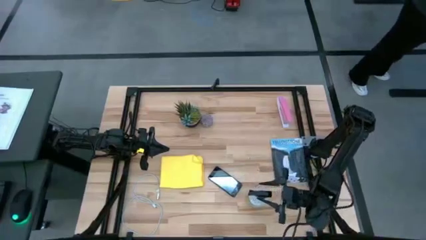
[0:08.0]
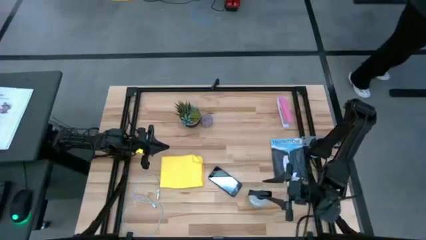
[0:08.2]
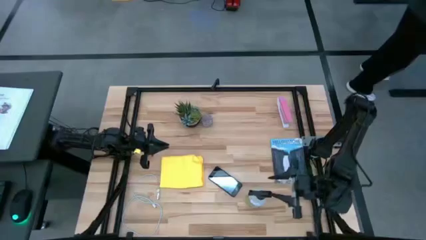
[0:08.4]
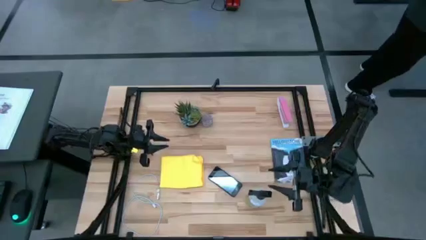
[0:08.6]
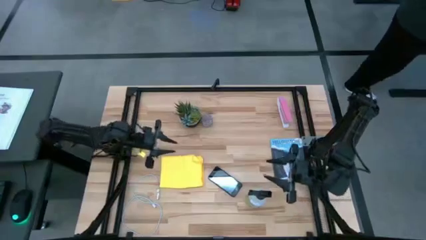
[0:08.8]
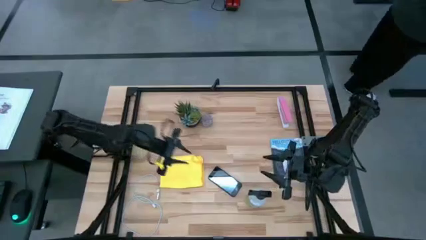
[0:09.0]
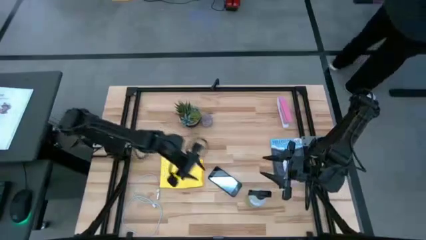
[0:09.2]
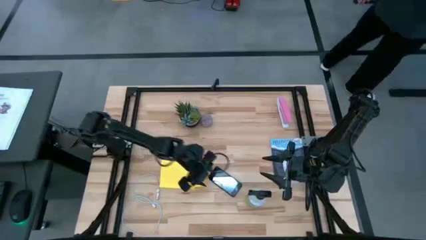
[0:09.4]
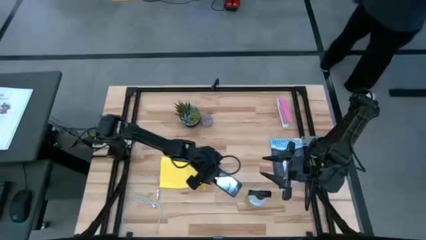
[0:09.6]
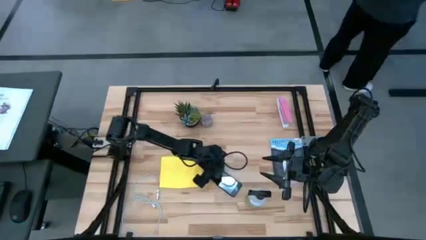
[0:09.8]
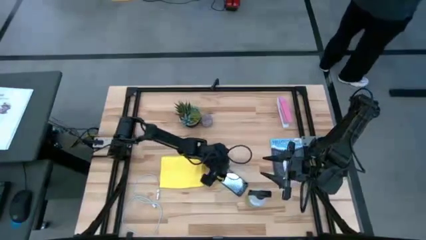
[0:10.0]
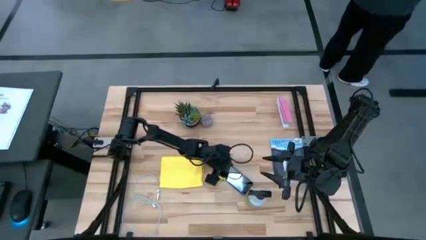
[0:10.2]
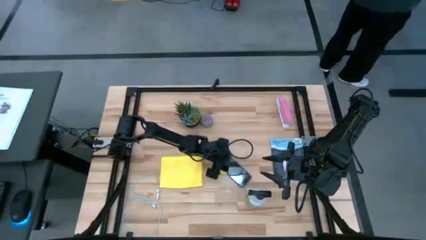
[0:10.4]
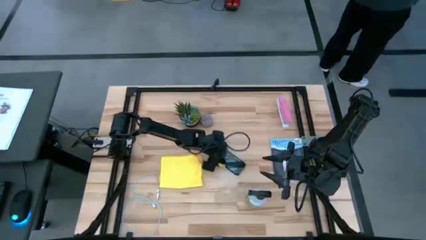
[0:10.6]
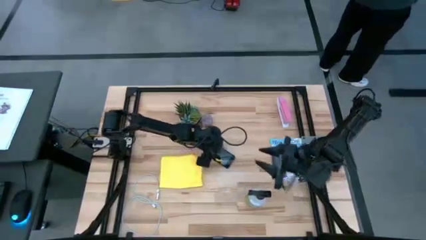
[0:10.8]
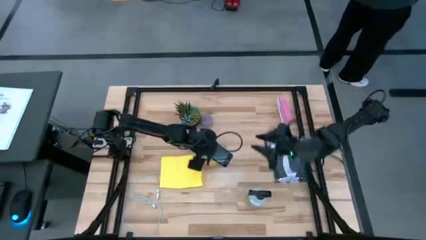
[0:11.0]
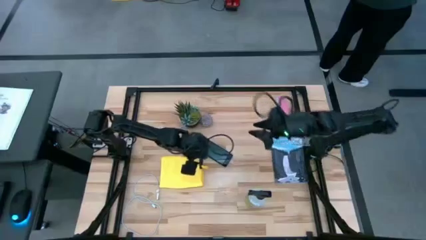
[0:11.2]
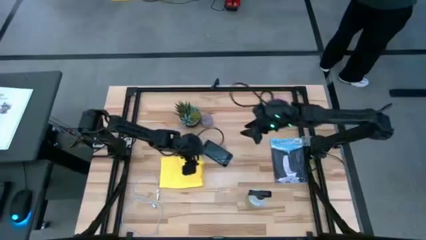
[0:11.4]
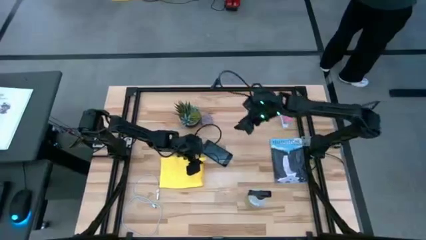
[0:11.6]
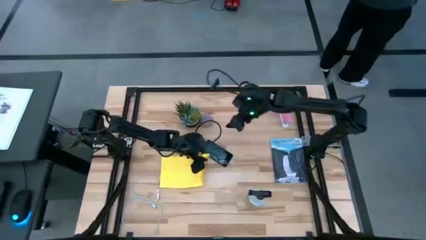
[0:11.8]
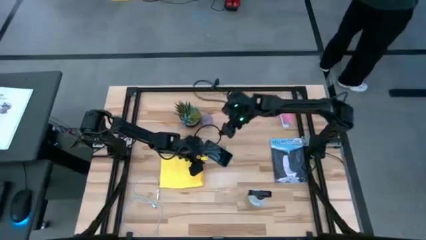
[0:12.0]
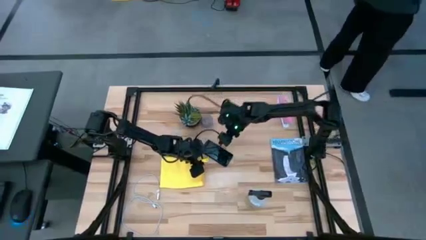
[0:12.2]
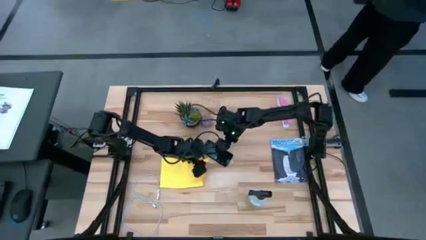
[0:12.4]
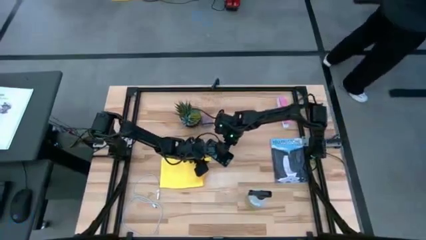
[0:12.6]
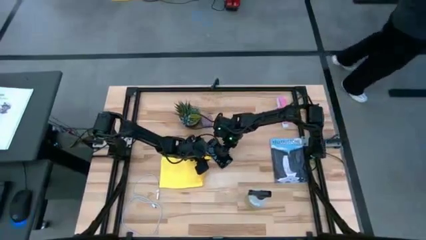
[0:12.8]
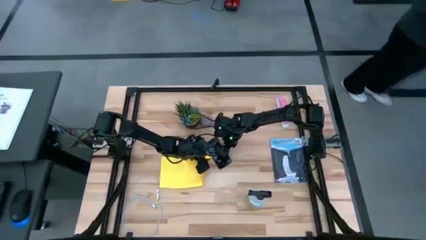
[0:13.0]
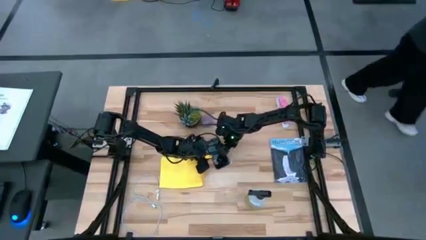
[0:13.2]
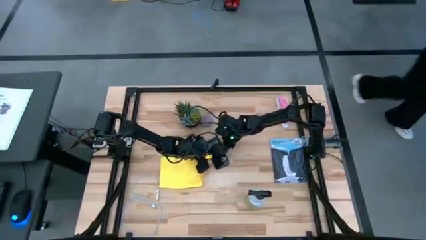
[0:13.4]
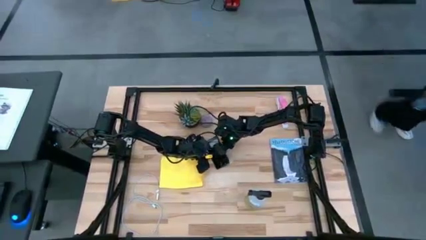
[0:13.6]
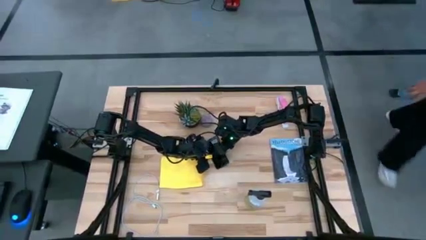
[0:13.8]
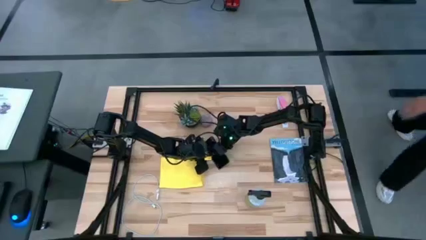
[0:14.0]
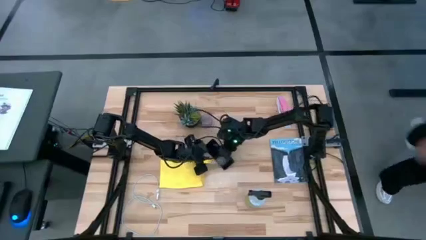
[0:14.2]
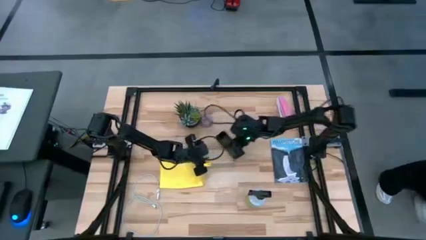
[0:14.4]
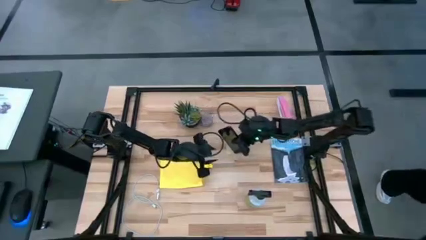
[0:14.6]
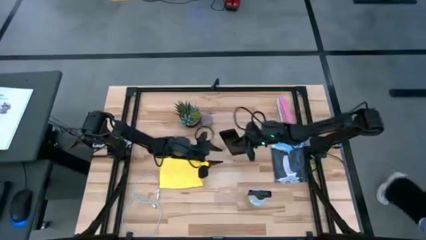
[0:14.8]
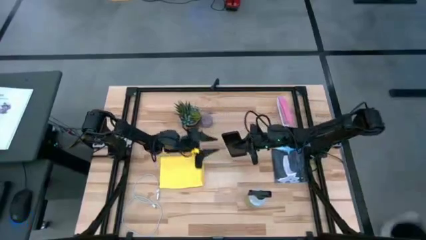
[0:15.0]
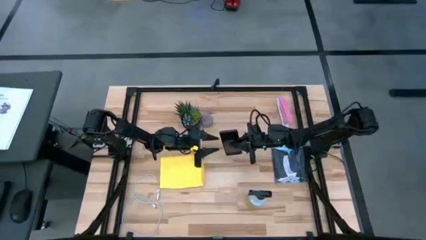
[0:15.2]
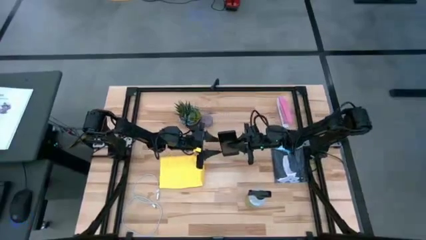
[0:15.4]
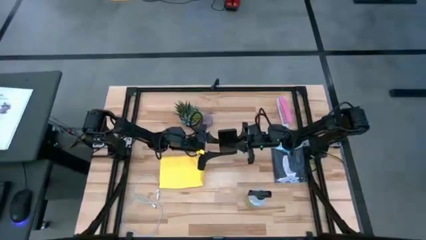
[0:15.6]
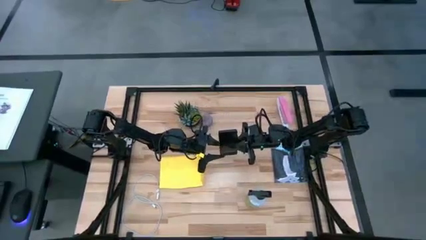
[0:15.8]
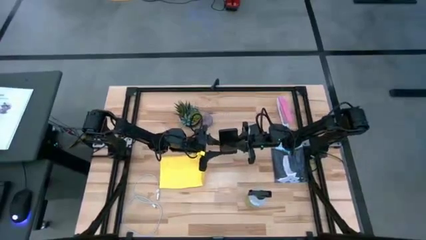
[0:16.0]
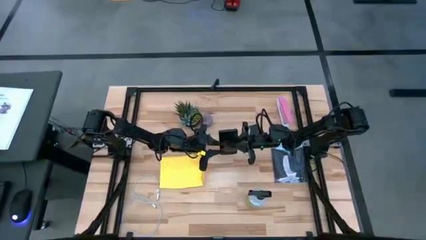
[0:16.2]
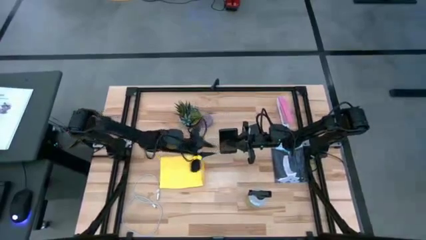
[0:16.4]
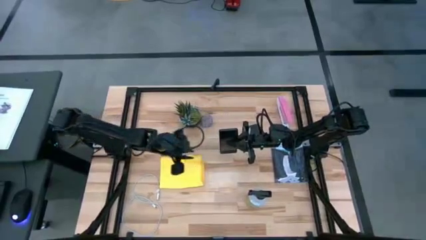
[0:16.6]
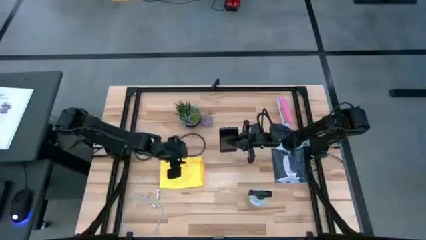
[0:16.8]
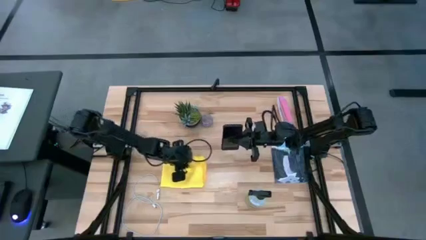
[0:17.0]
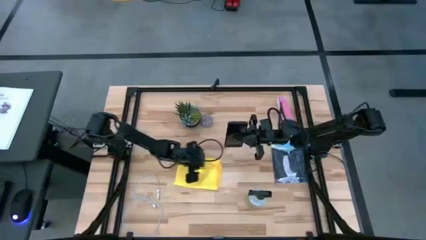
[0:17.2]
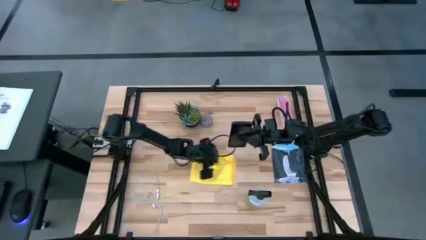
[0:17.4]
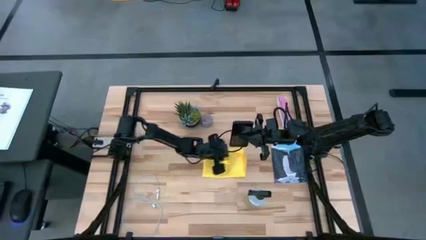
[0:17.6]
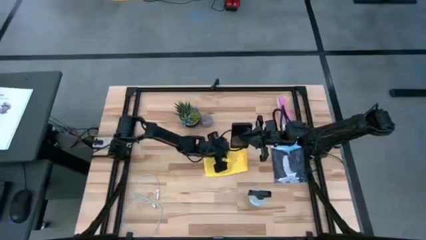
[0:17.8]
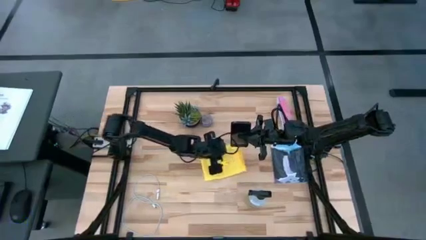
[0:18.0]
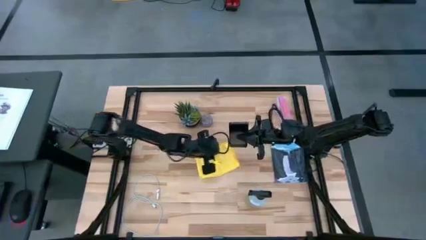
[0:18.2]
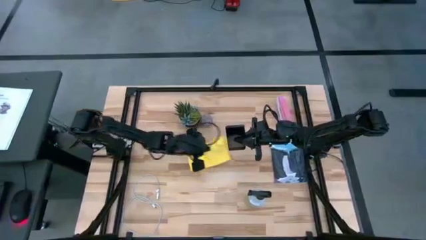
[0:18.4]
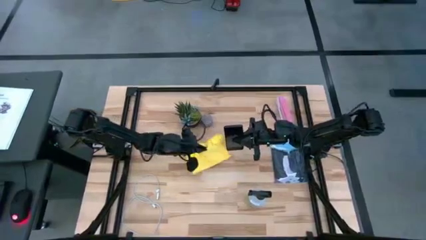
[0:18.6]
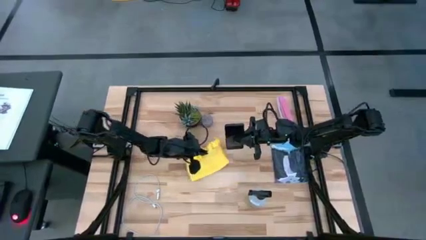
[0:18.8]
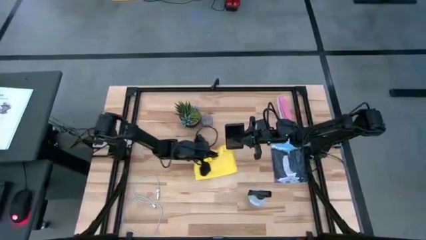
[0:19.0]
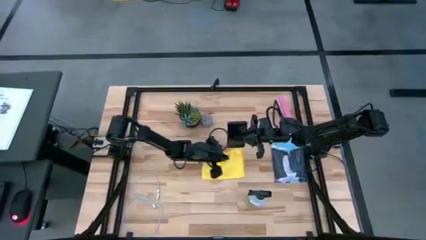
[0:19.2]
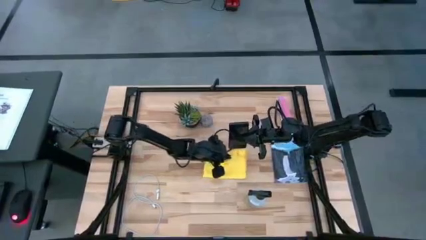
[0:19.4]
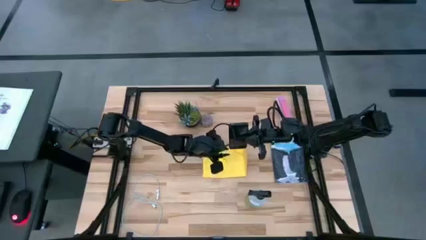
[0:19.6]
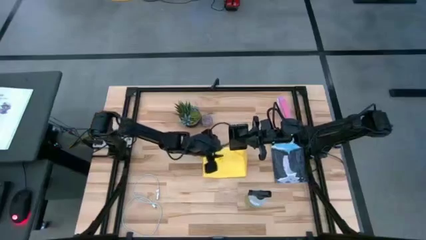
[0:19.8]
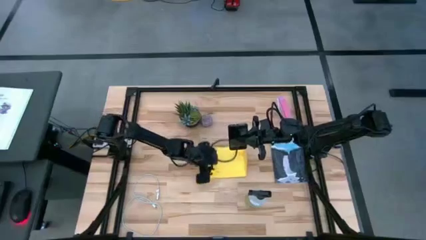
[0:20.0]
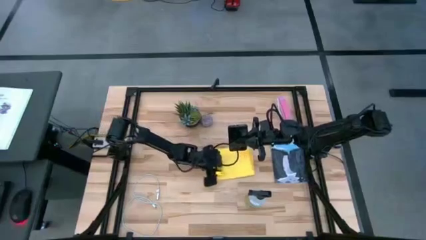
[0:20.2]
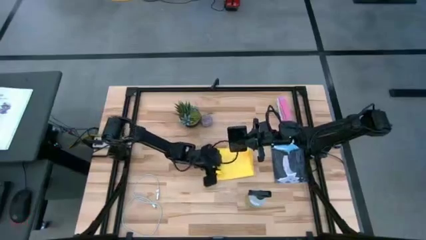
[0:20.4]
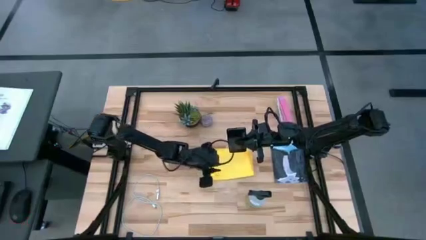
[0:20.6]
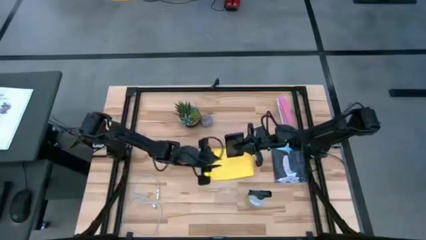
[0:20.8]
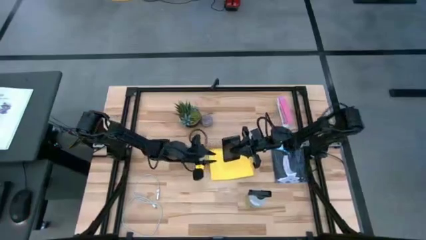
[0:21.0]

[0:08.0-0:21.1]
Task: Apply microfiber cloth
Spray the front side of the cellphone using a spray bottle
